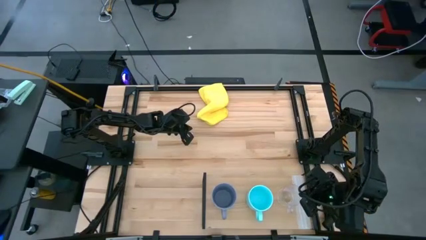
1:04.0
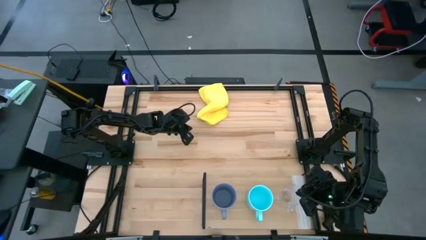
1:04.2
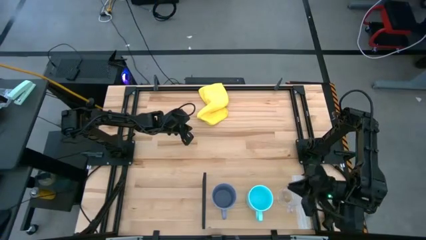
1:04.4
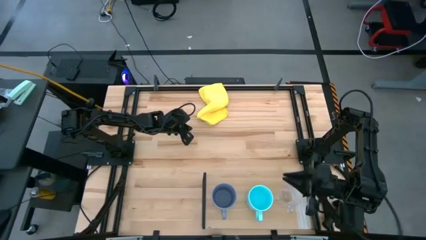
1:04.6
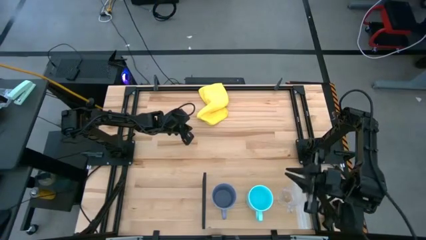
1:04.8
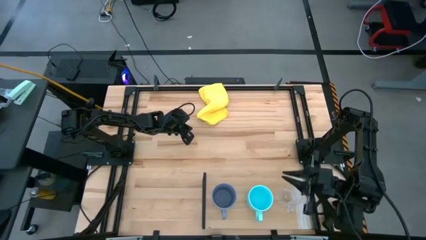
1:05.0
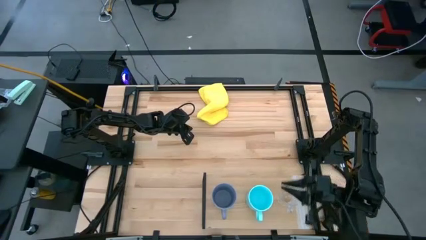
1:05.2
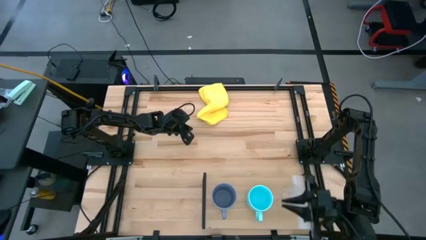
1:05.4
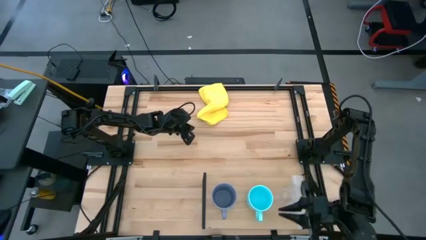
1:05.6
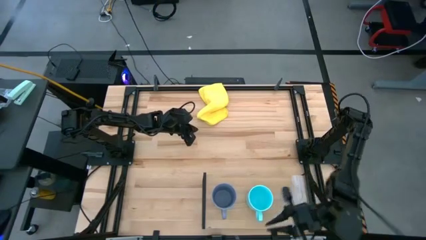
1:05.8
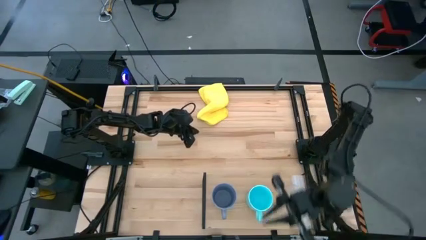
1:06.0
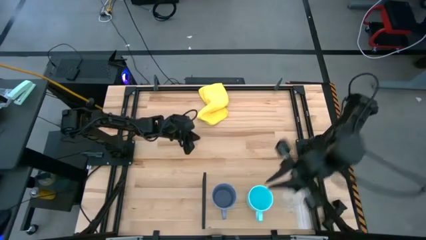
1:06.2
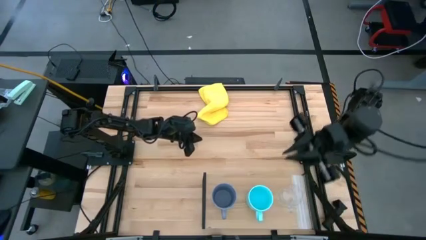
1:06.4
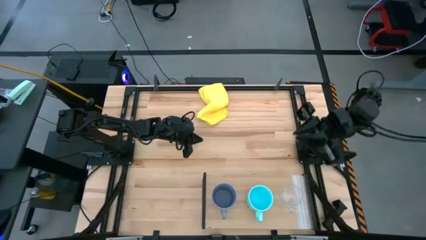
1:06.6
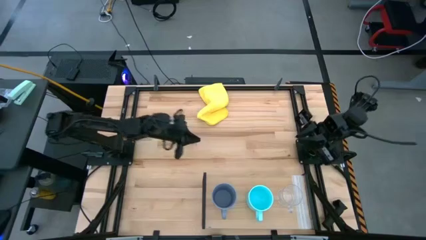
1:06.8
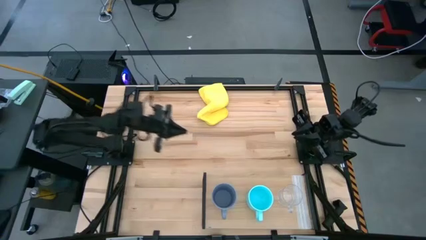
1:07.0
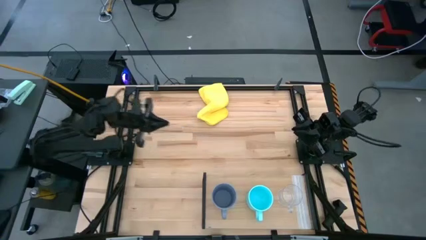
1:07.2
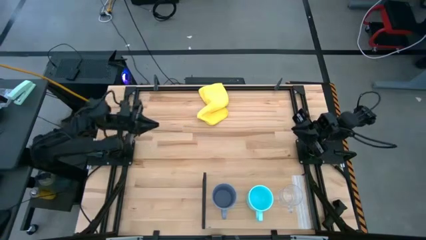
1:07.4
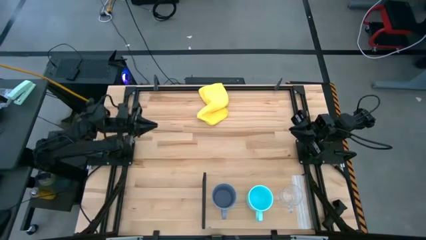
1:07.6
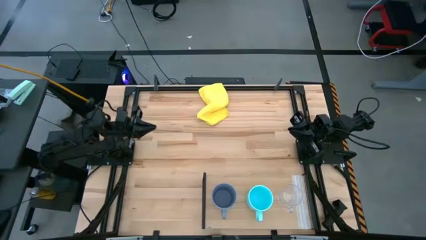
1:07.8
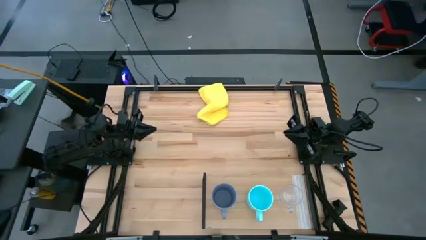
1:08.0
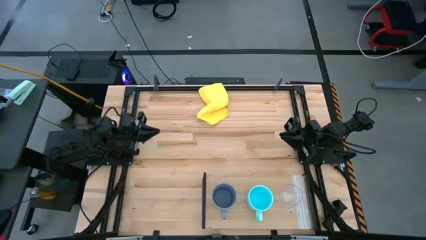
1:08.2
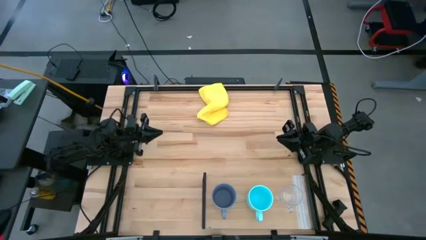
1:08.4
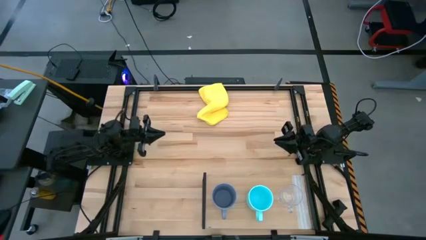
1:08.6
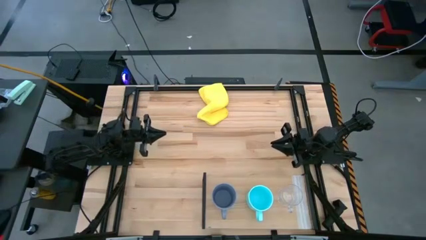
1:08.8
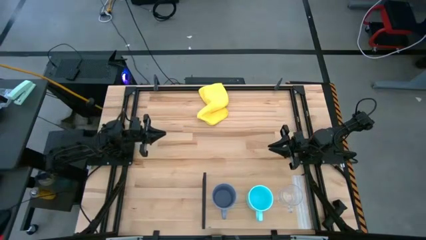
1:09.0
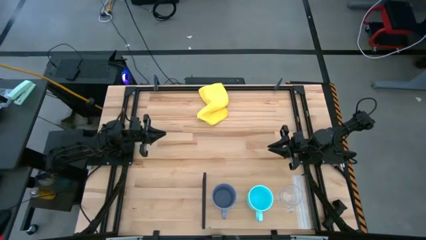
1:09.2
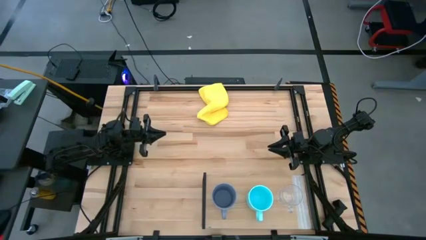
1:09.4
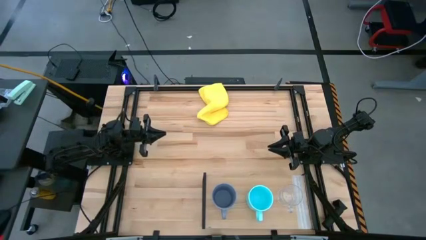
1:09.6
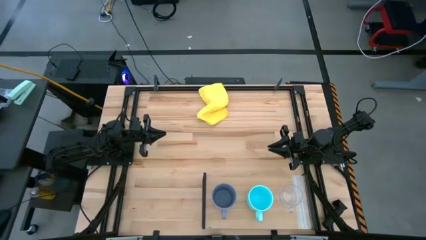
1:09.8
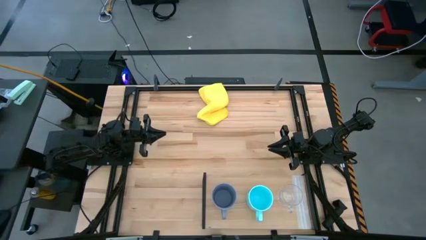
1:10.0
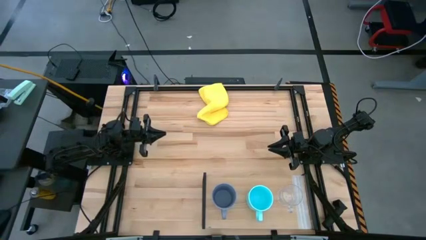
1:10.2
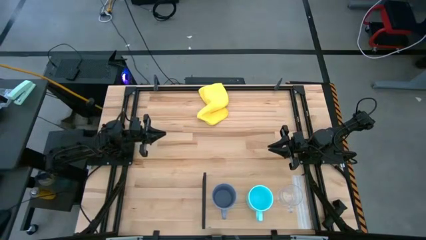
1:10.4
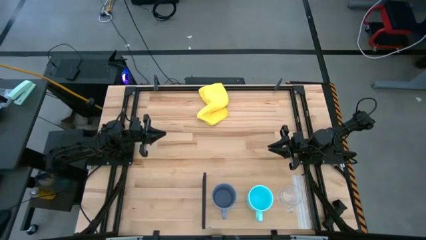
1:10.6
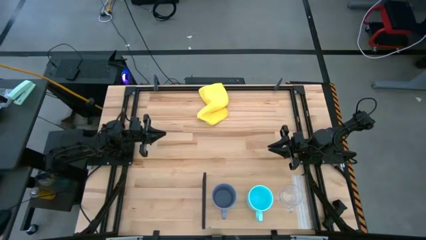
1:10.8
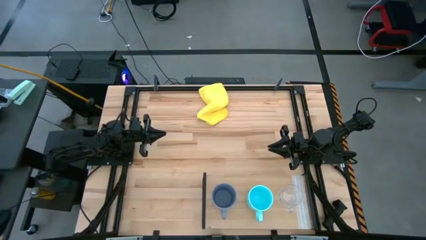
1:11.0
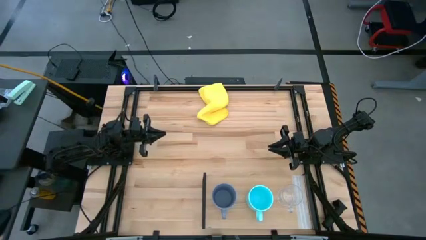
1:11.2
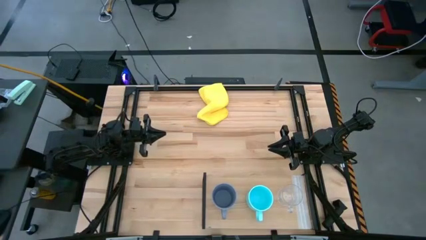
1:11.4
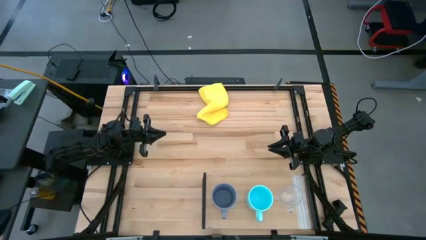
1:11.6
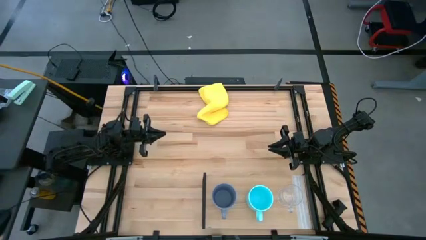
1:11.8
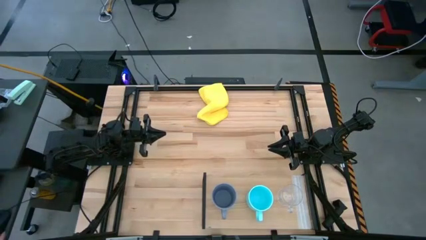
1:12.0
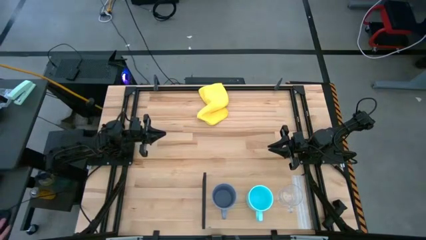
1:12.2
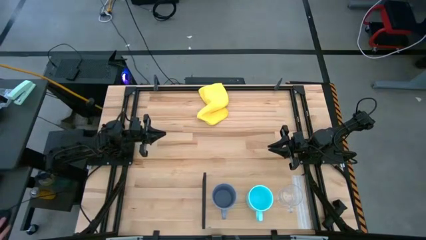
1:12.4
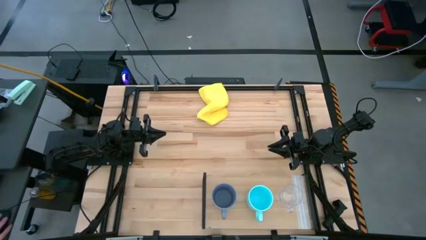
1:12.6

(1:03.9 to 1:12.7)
Task: Stack small to large cups/mugs on shelf
Return to Home Position

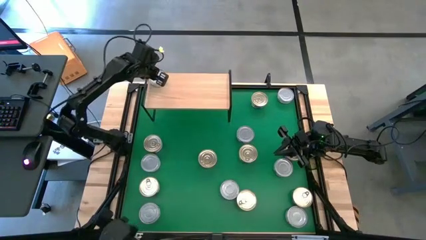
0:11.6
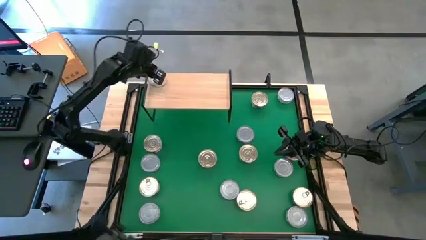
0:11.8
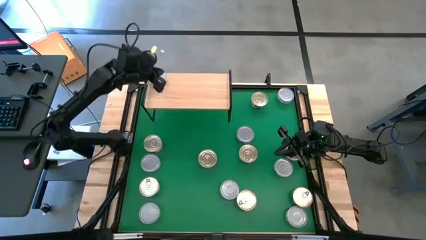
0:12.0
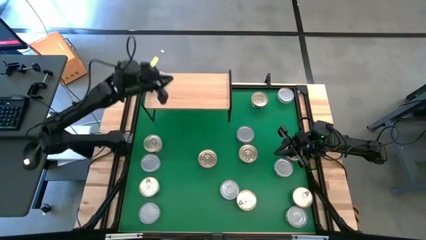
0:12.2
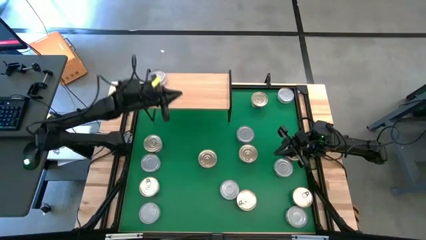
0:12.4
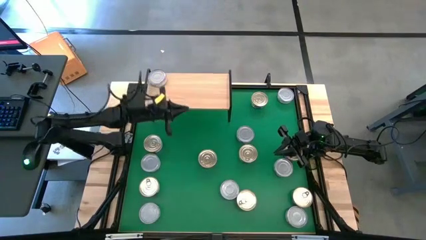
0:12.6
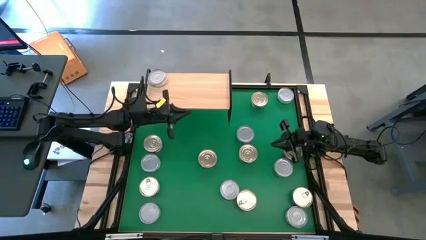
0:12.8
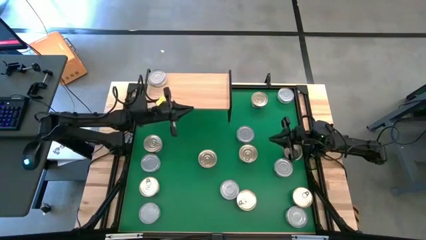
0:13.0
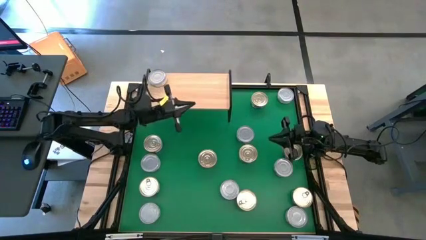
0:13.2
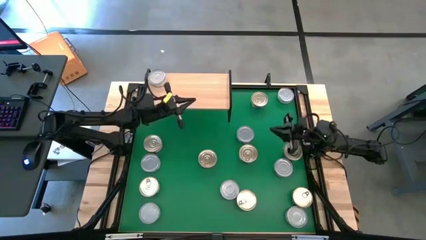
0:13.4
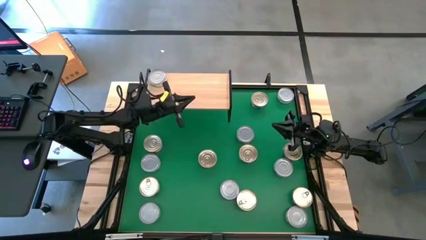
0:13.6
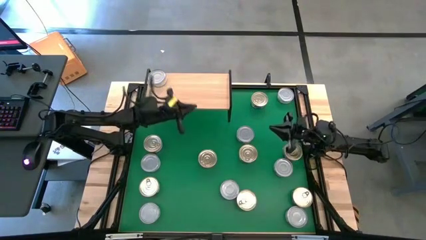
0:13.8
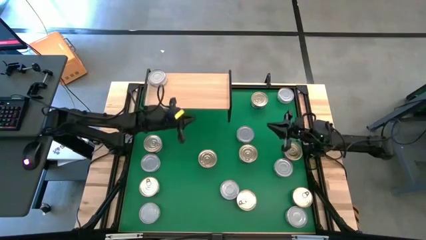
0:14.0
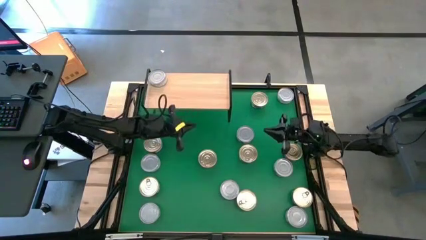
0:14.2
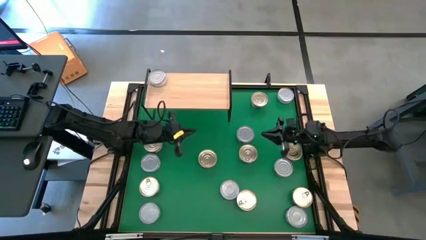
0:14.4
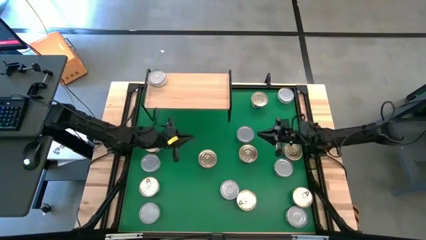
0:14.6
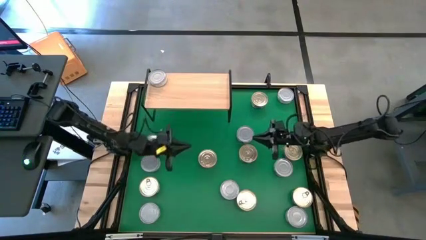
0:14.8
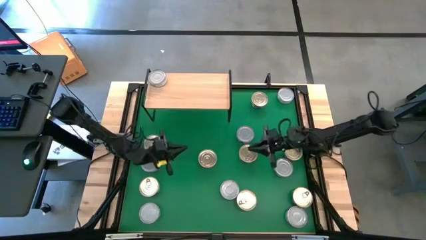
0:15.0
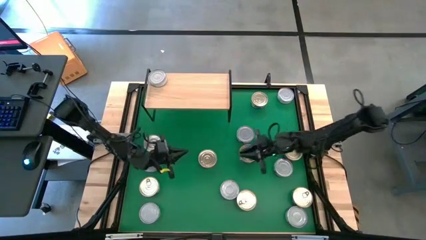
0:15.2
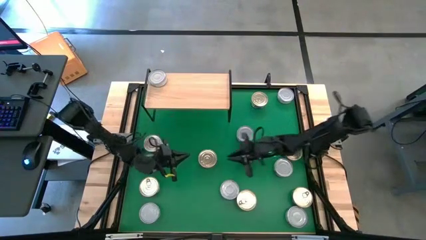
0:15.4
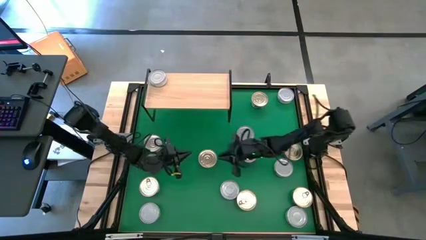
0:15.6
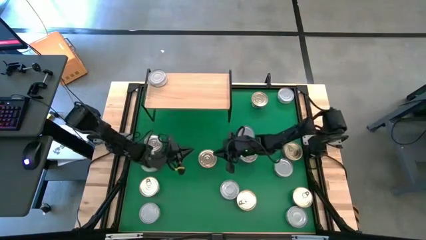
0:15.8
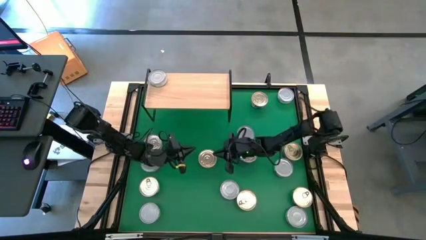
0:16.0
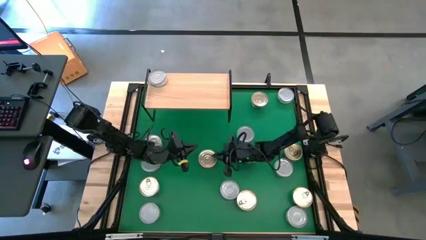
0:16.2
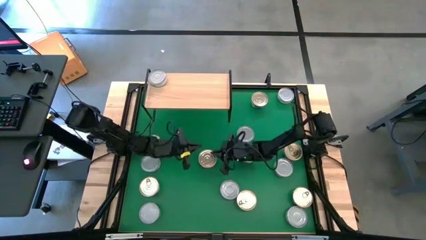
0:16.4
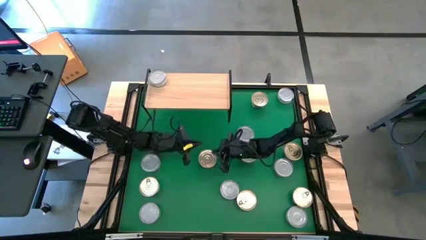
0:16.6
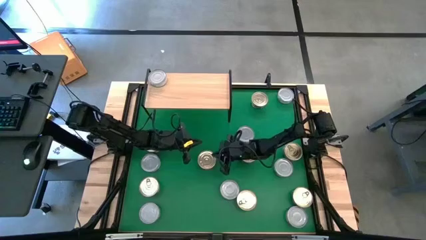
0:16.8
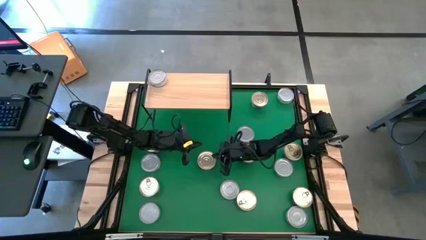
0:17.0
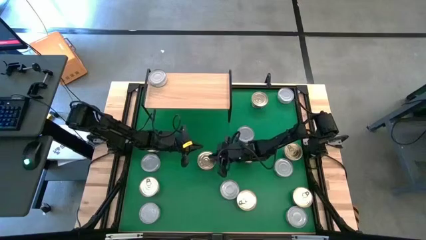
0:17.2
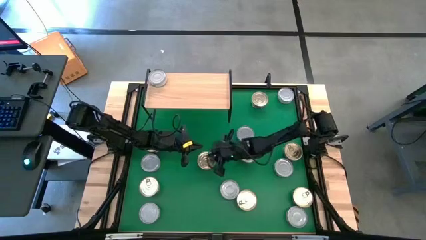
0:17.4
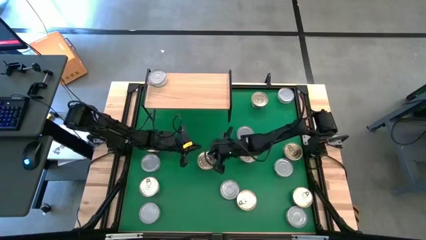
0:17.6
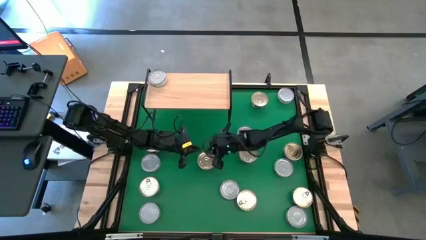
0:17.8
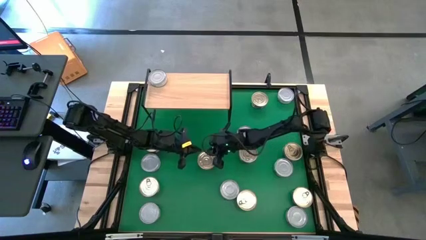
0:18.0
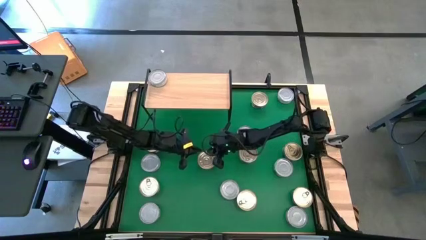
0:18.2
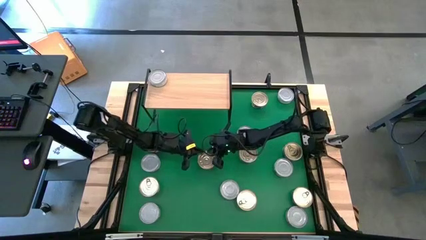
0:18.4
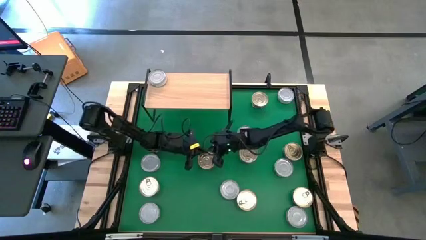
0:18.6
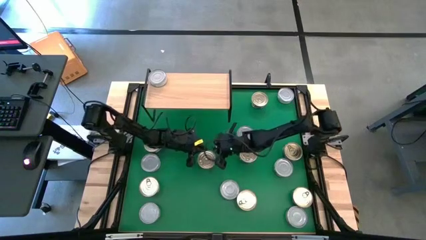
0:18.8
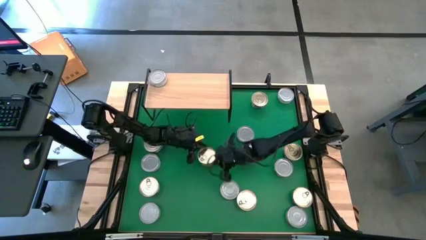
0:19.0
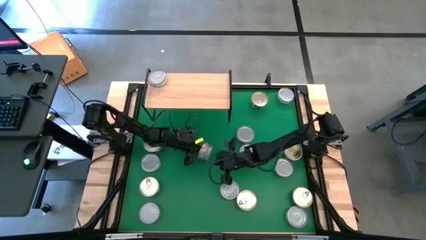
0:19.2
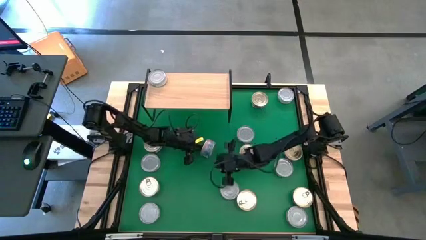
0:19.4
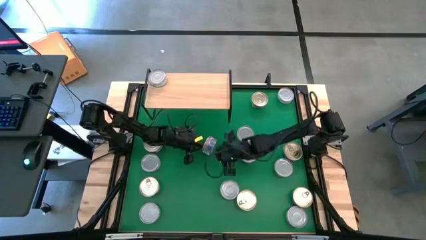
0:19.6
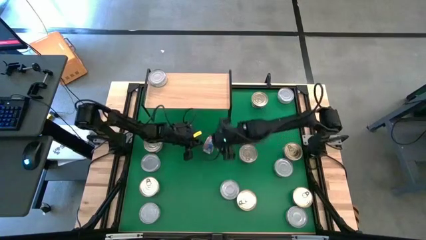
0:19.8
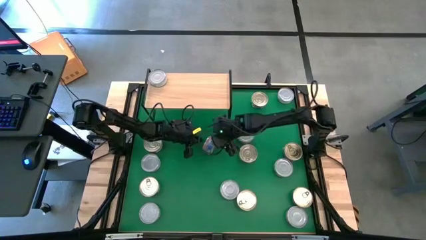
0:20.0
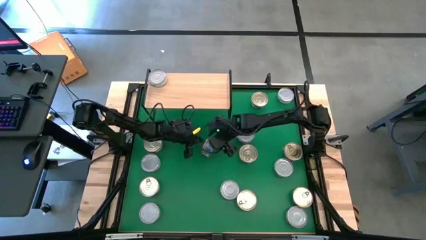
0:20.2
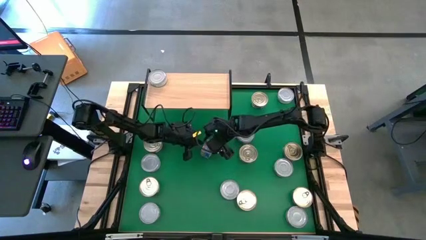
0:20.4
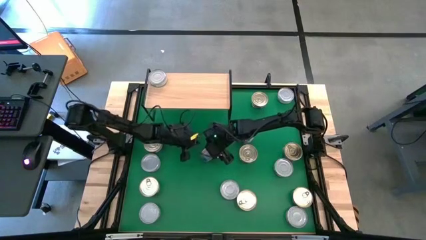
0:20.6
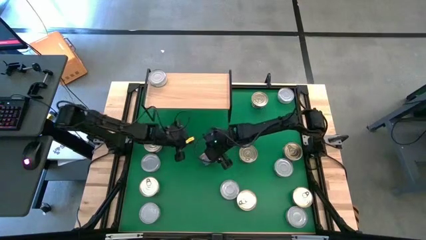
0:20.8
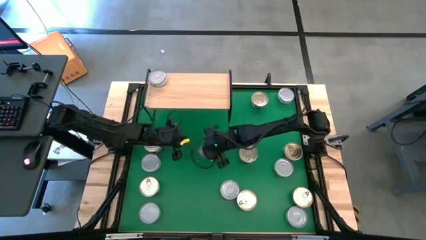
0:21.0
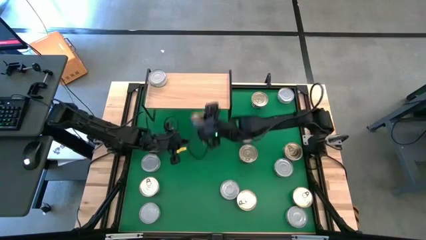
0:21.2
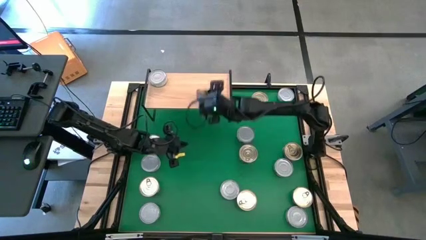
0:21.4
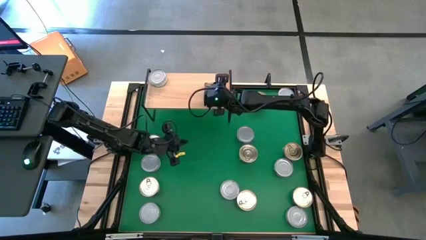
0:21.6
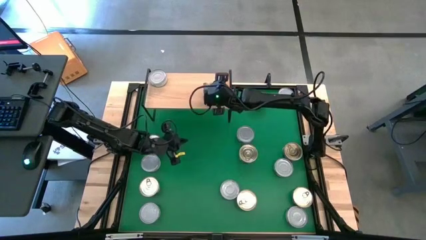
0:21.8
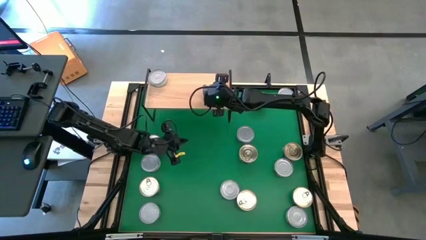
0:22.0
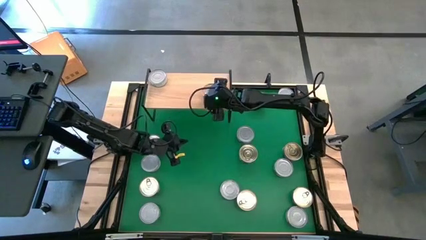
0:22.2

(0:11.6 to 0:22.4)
Task: Stack canned seafood by type on shelf
Put the blue-pink tuna can on the shelf
